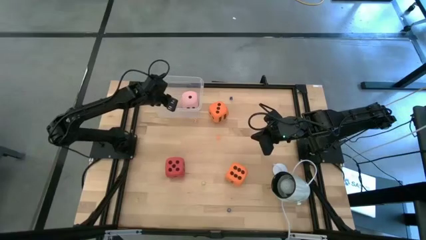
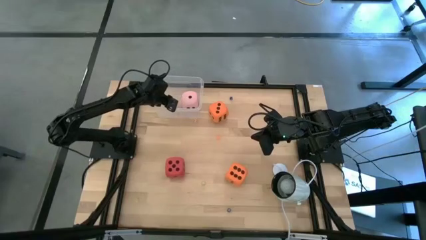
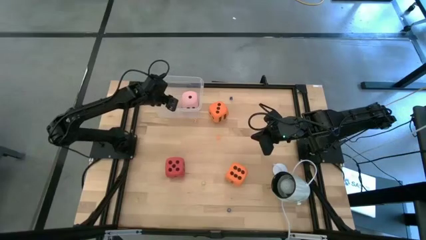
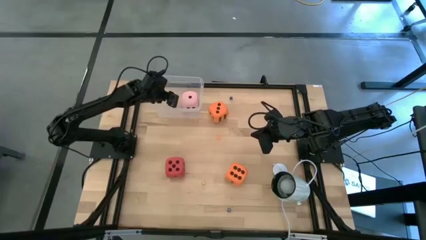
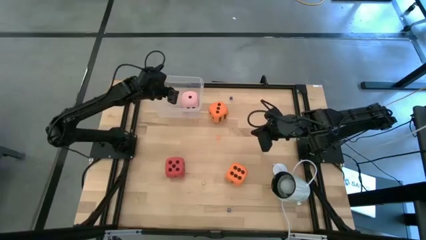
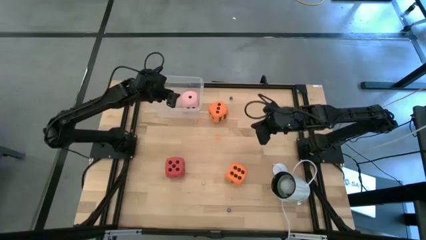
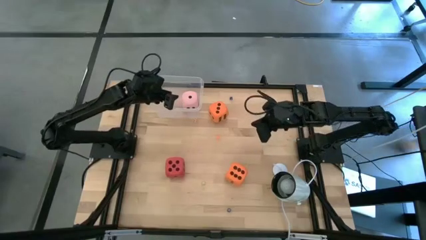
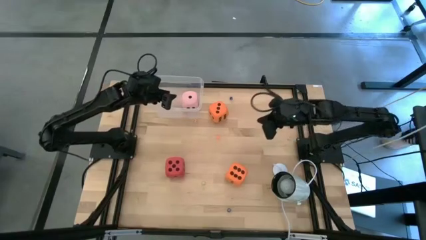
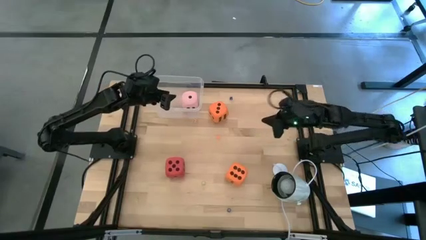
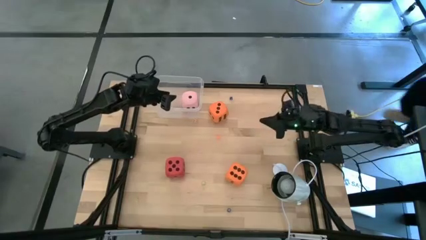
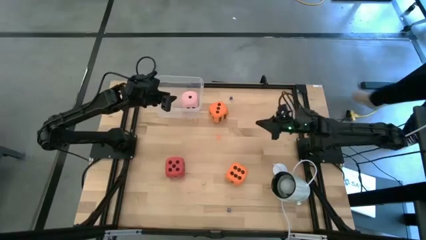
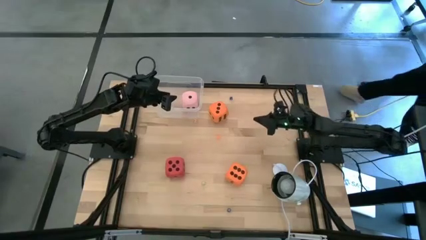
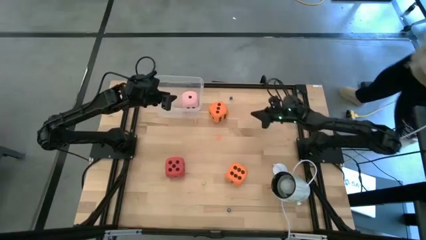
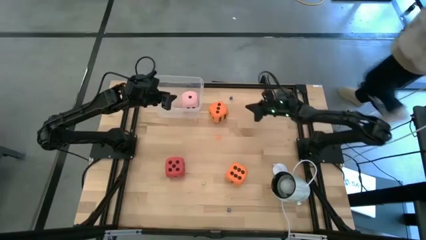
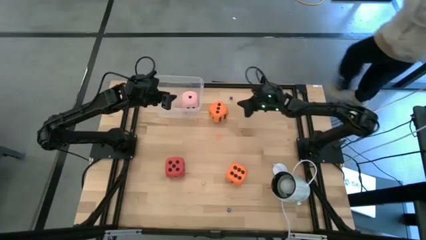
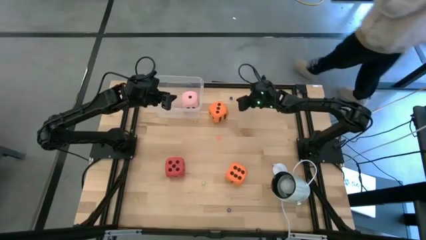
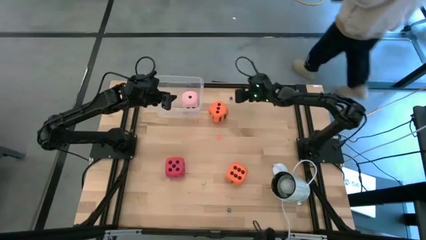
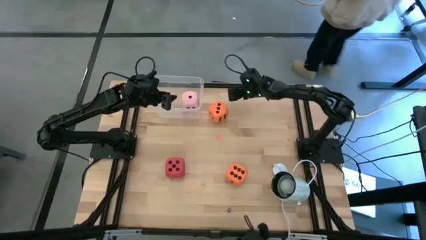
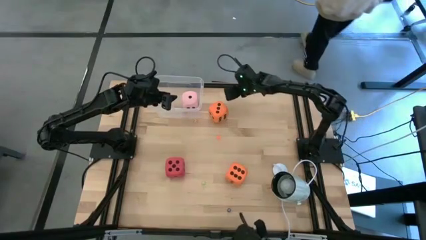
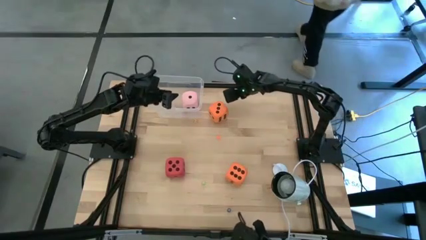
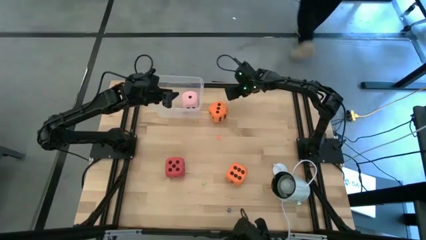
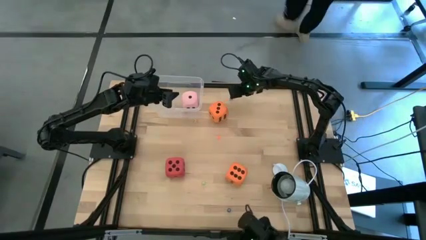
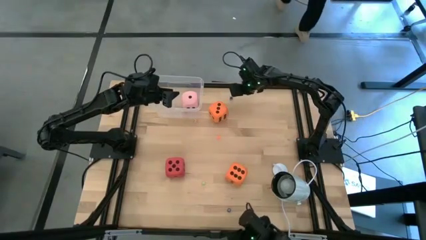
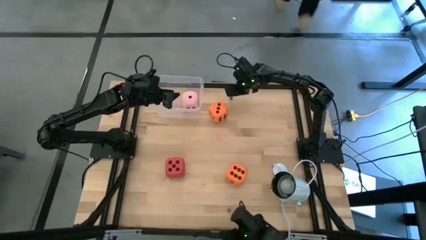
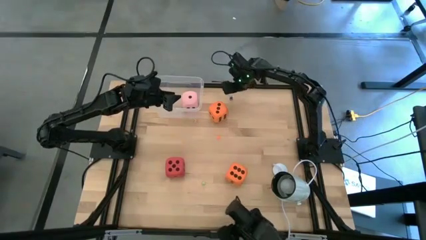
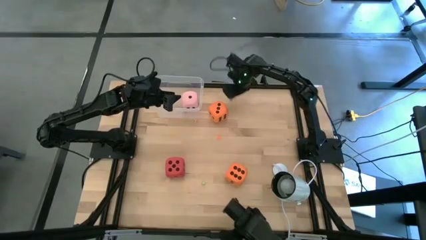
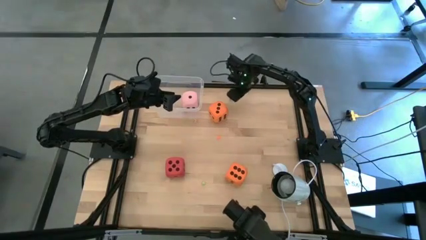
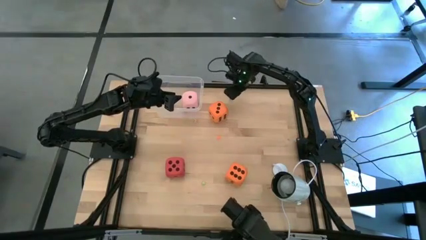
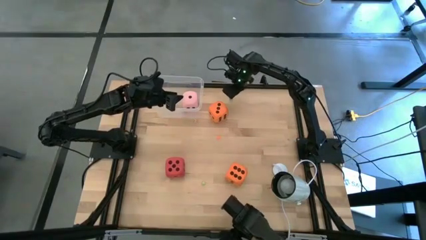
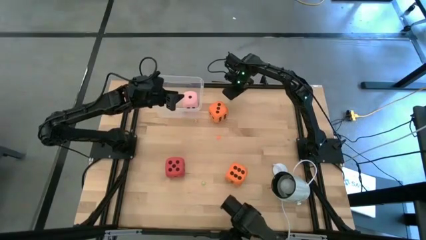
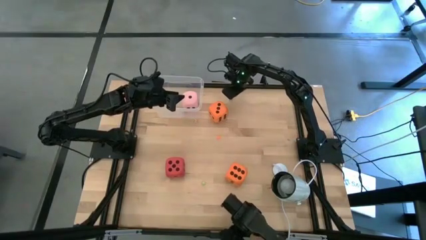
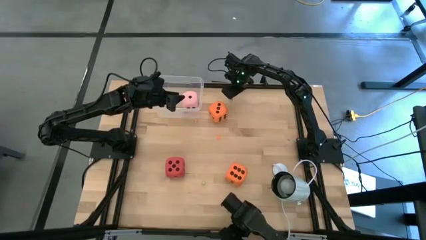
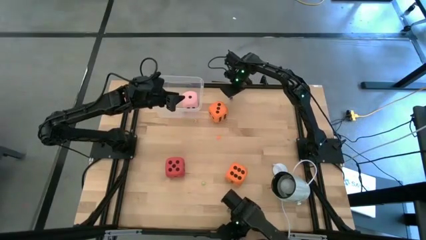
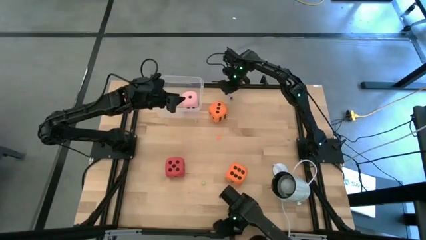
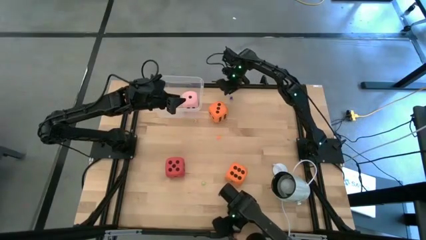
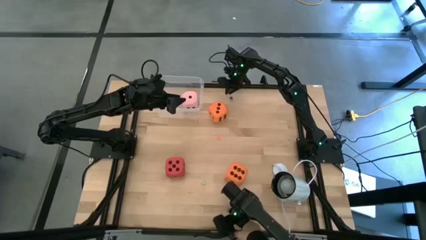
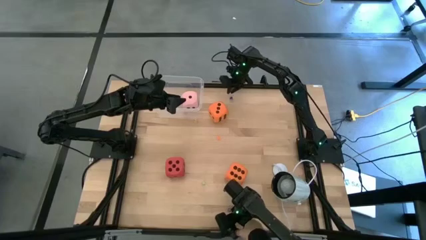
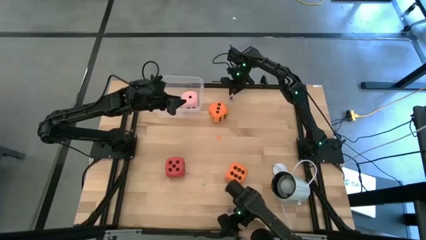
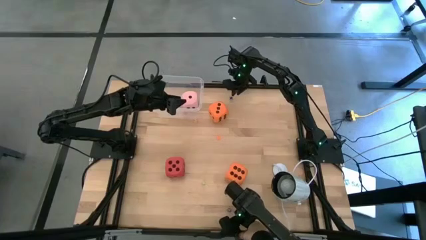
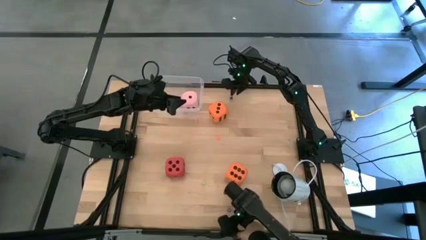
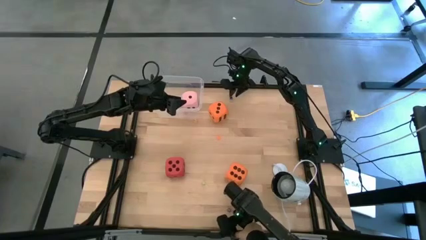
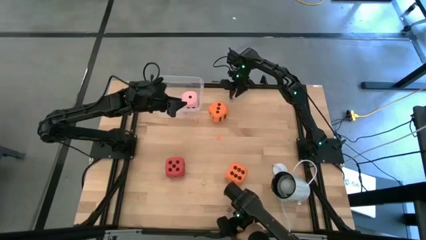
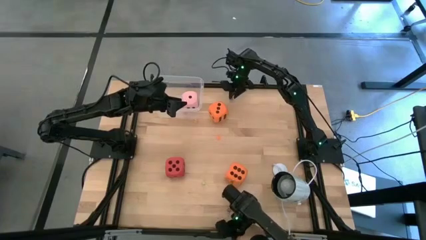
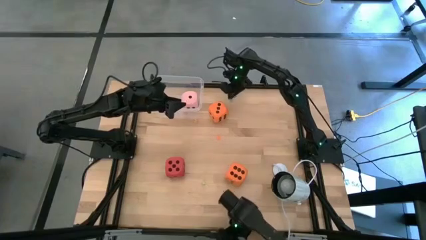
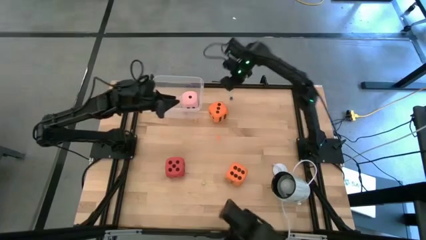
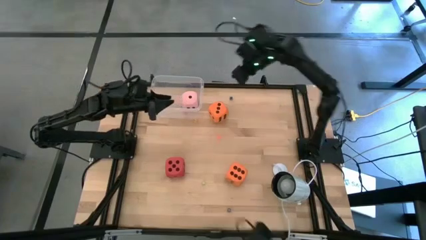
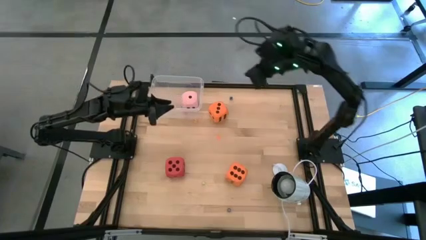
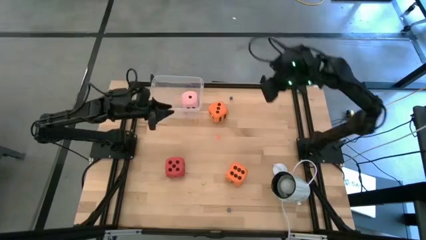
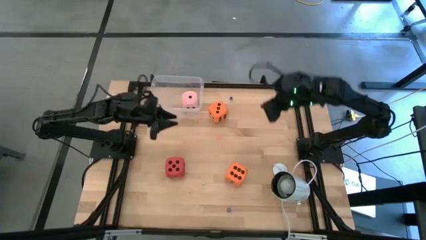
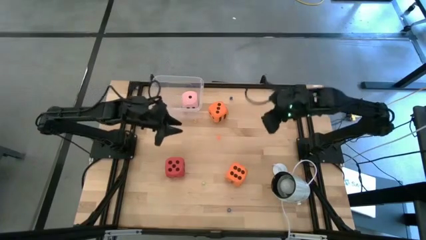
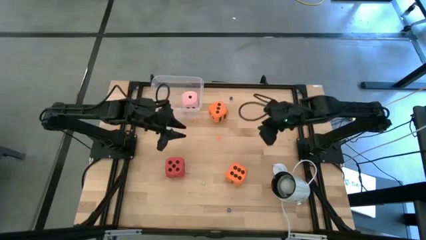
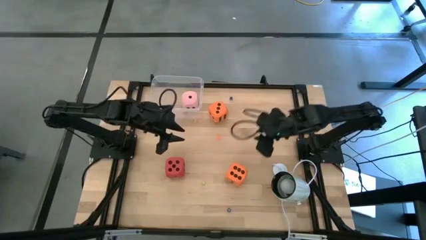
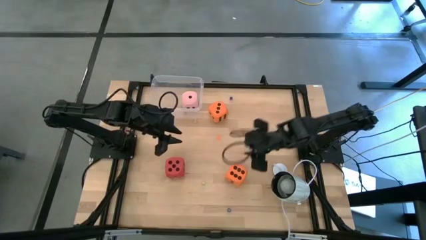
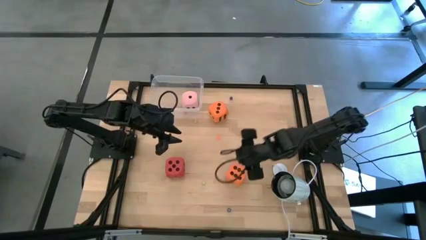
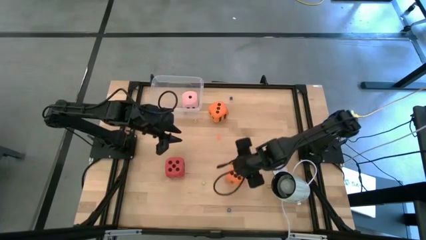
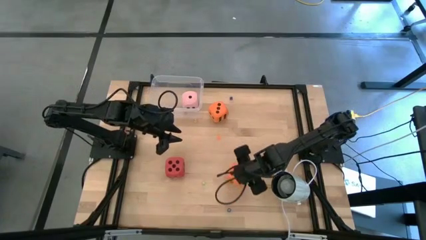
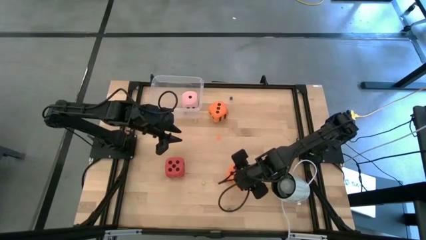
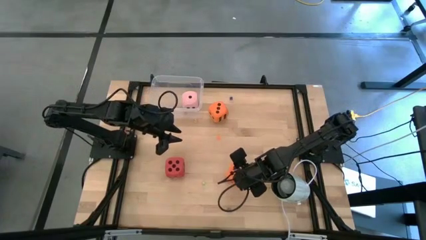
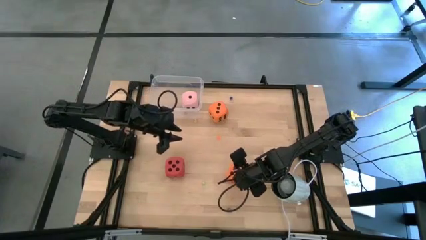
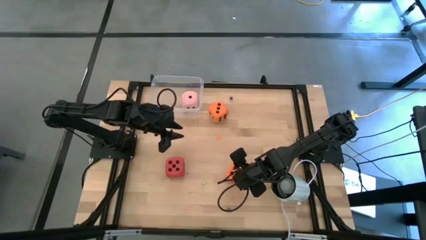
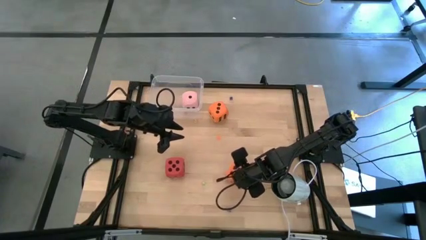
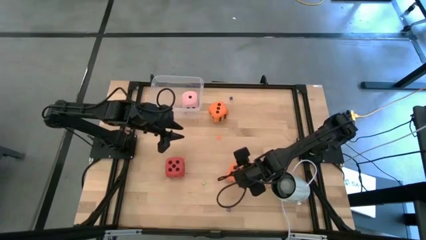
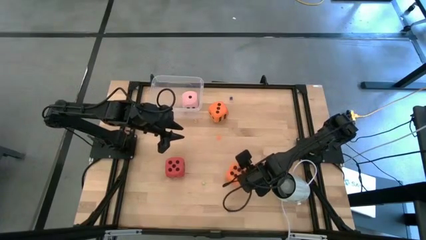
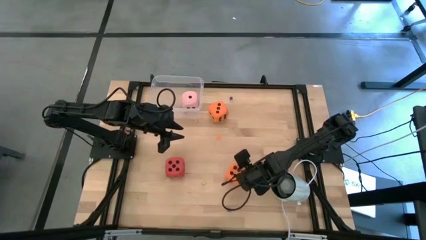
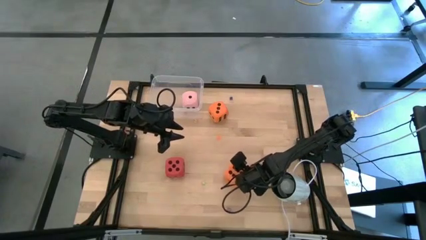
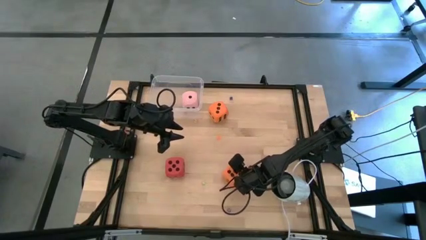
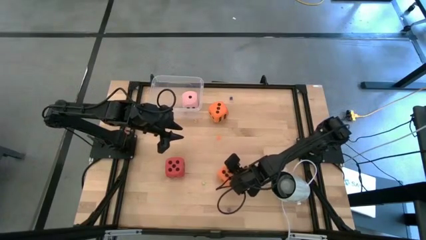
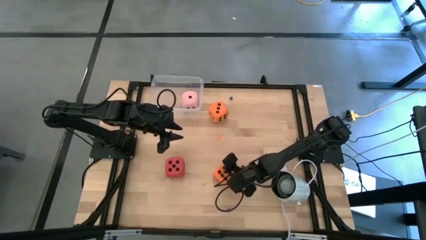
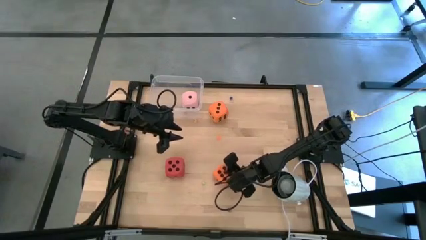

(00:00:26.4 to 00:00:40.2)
Task: Pick & Place Dice
Put the bottom large orange die into the transparent bin
